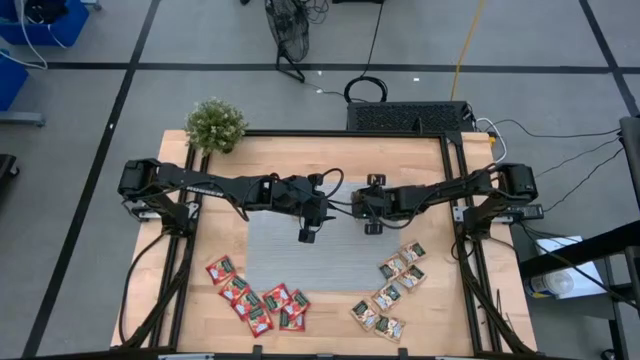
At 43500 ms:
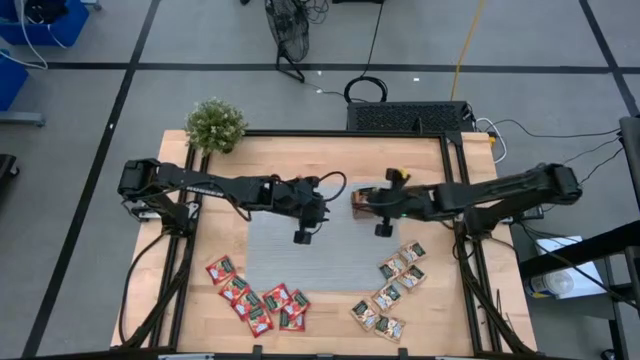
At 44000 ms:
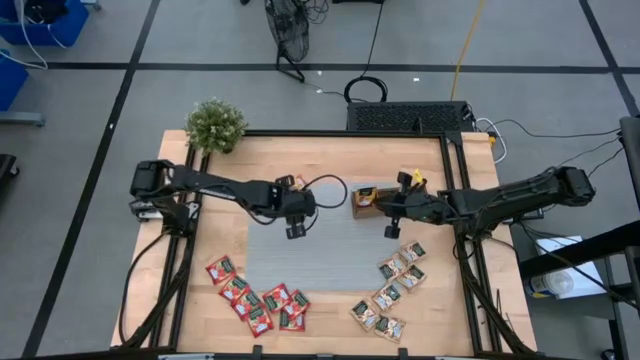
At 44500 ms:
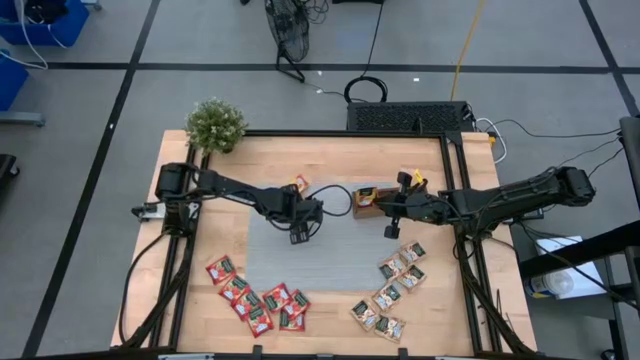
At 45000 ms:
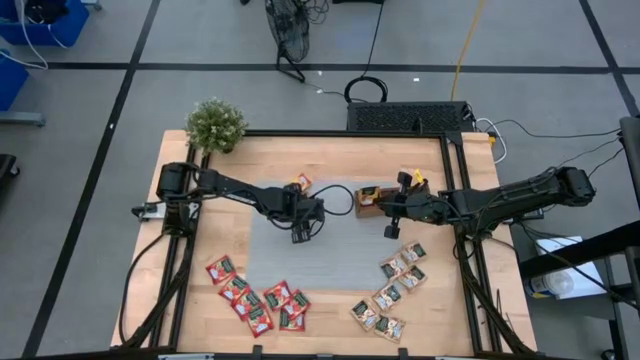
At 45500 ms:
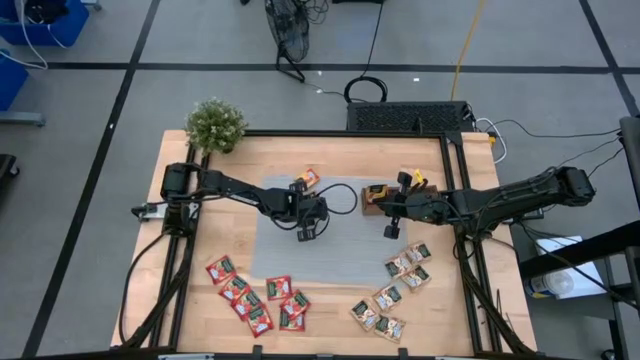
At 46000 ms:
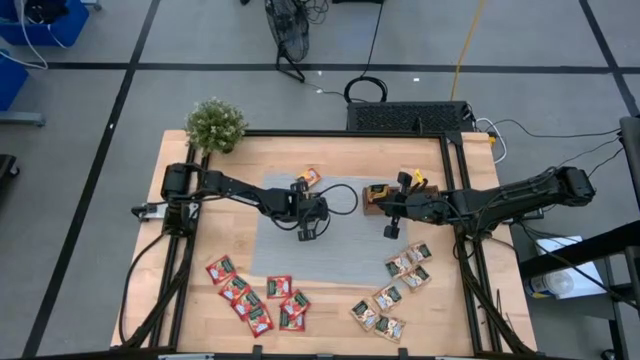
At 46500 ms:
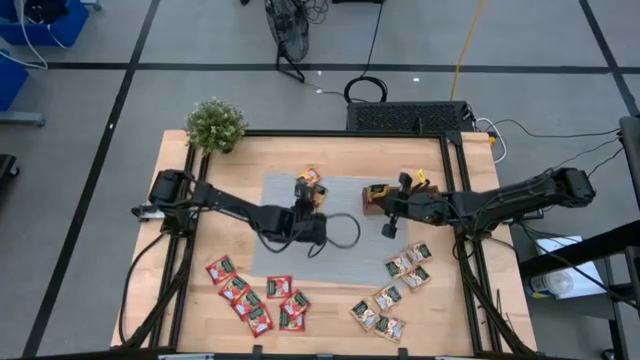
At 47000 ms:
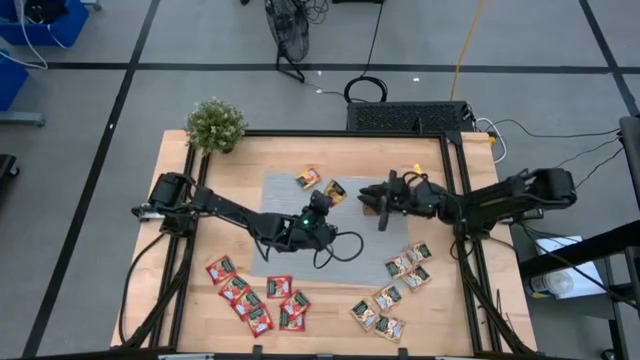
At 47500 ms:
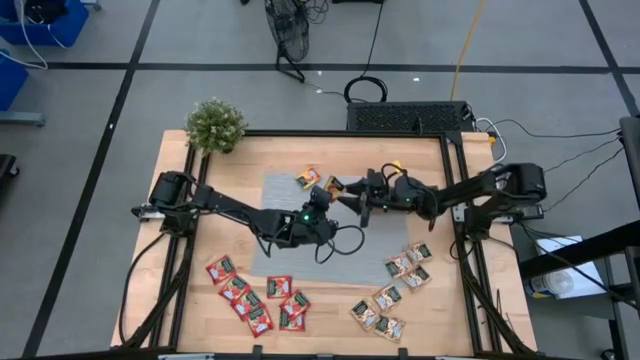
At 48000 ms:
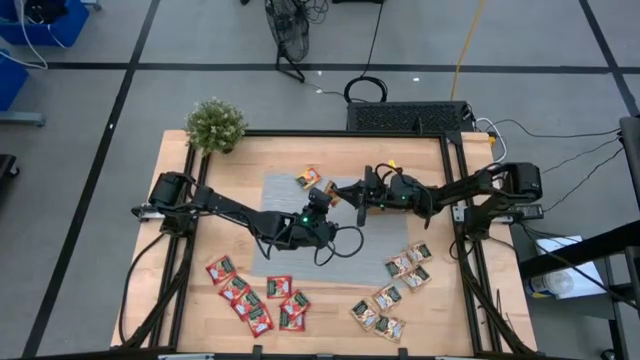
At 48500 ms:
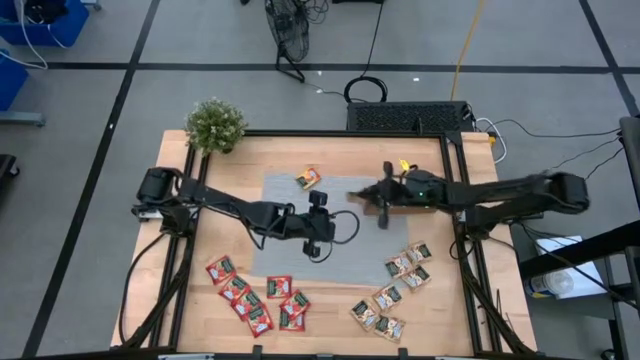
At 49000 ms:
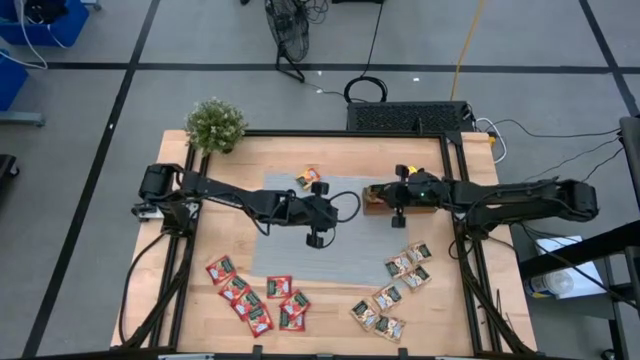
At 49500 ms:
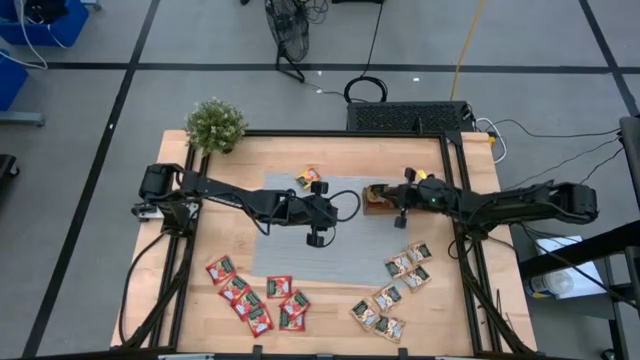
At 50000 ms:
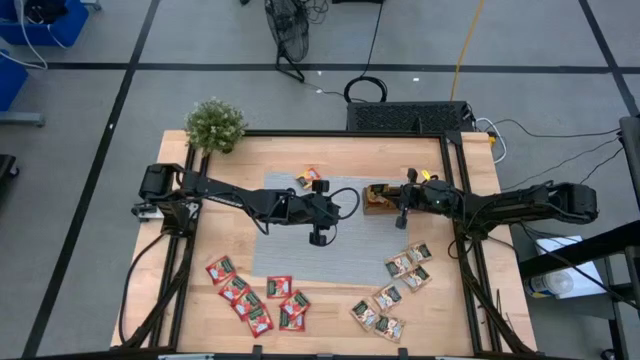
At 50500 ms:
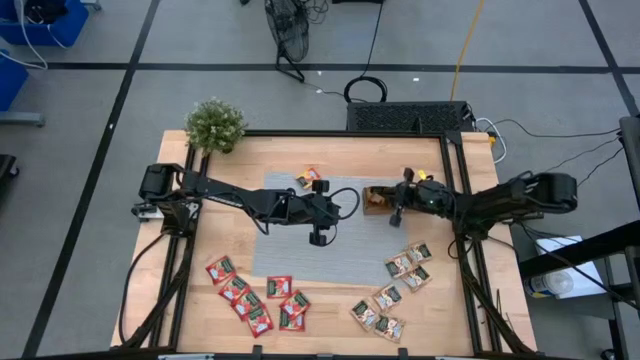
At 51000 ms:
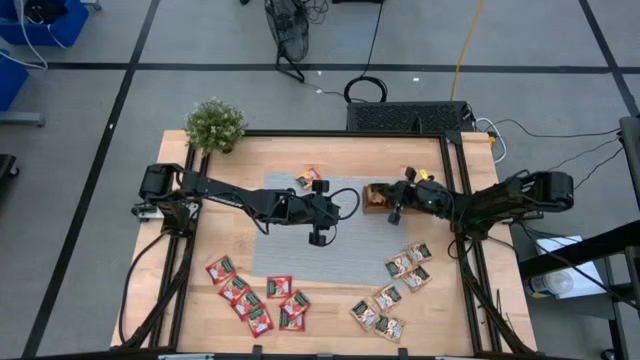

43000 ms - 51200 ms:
Task: Pick & Place Tea
Put the yellow tea bag into the left section of the wooden organizer

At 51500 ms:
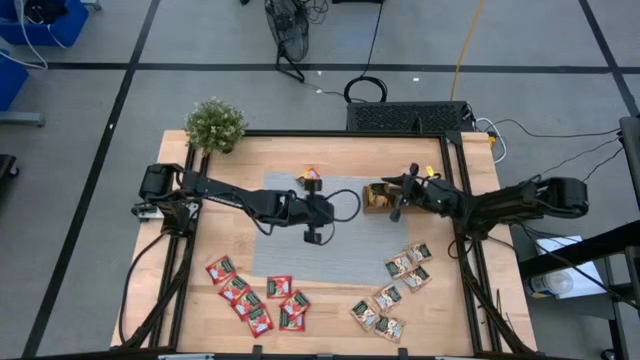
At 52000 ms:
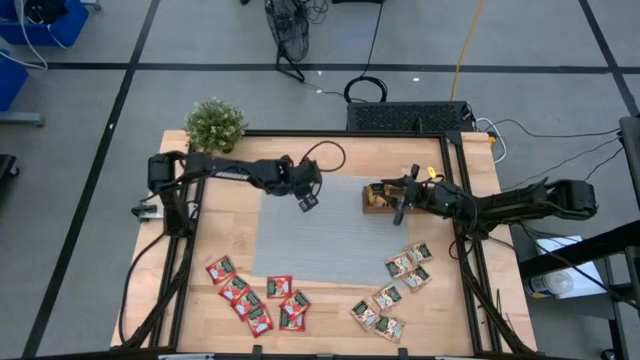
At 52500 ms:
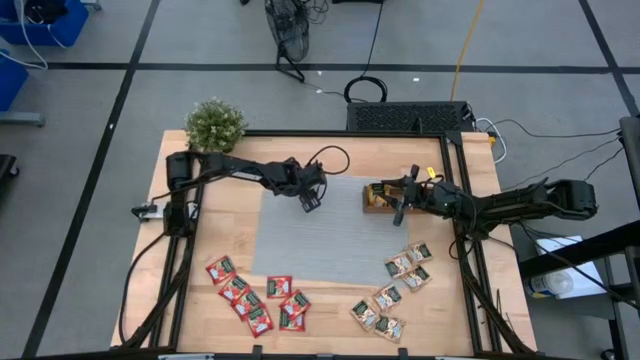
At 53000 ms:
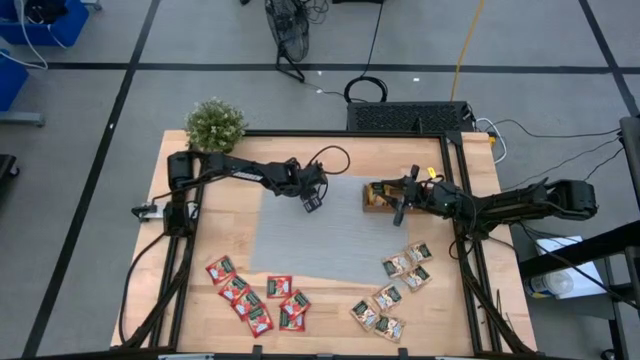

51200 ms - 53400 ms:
Put the yellow tea bag into the left section of the wooden organizer

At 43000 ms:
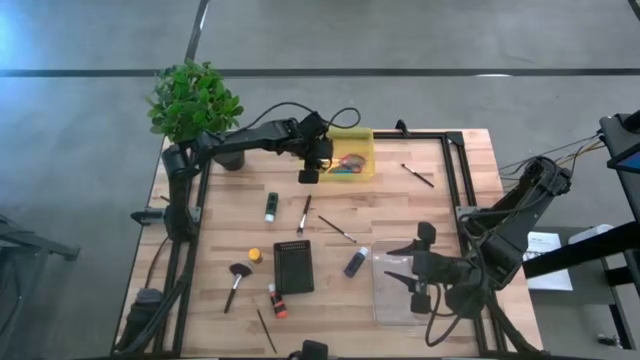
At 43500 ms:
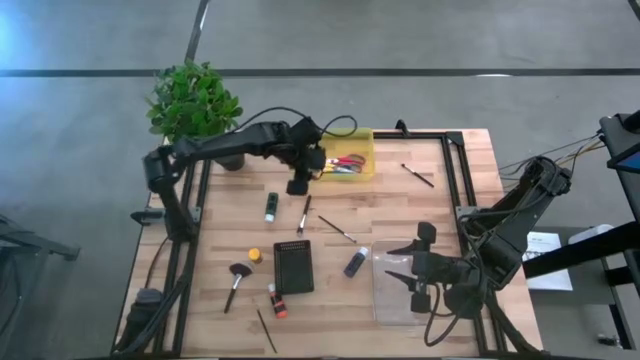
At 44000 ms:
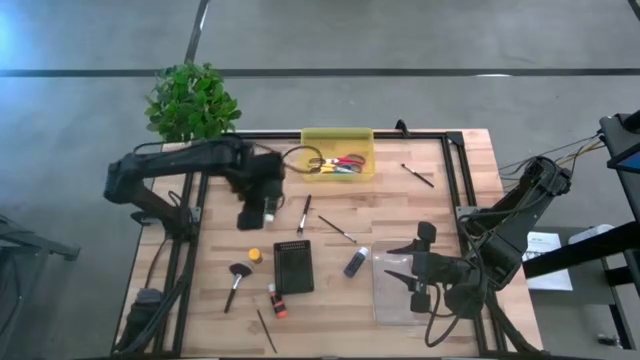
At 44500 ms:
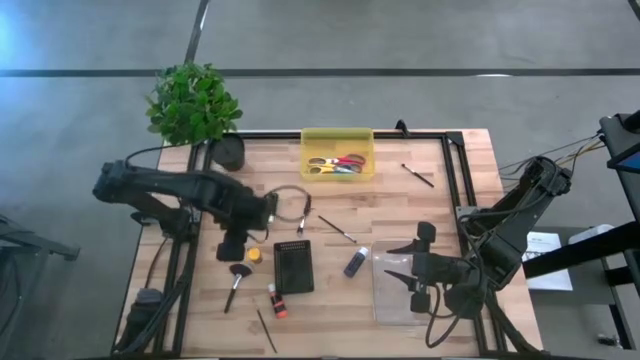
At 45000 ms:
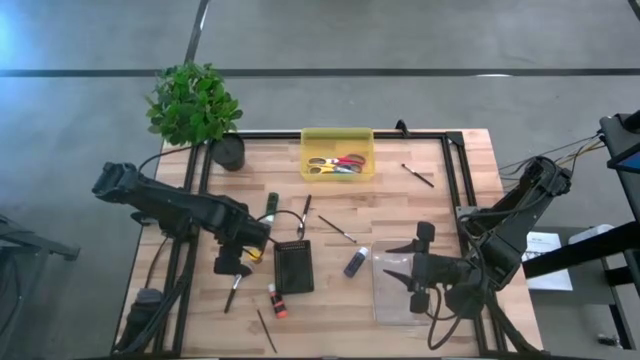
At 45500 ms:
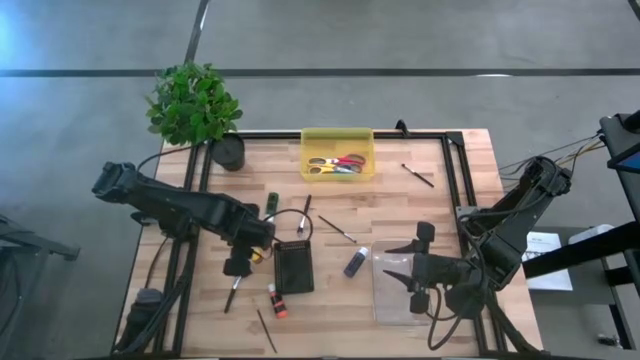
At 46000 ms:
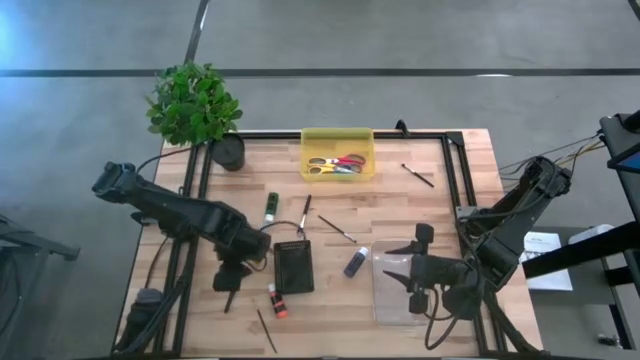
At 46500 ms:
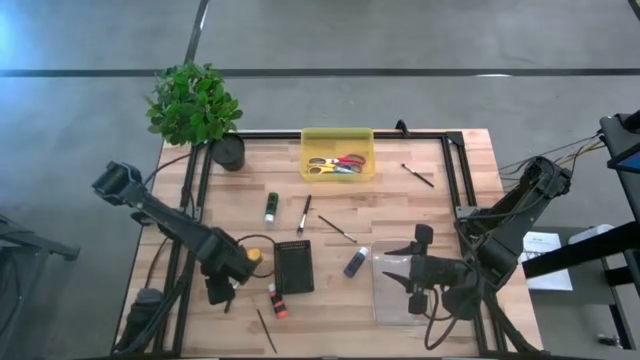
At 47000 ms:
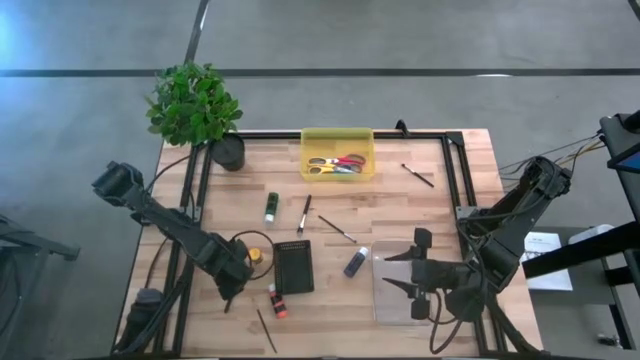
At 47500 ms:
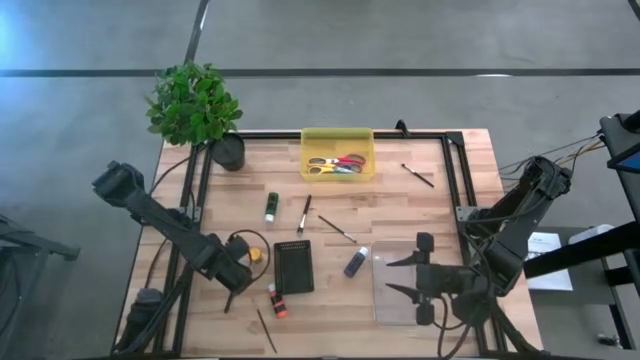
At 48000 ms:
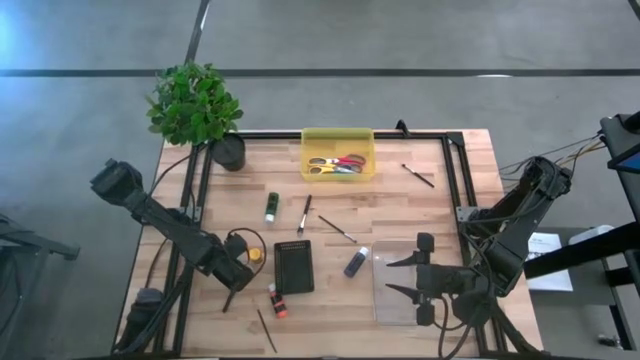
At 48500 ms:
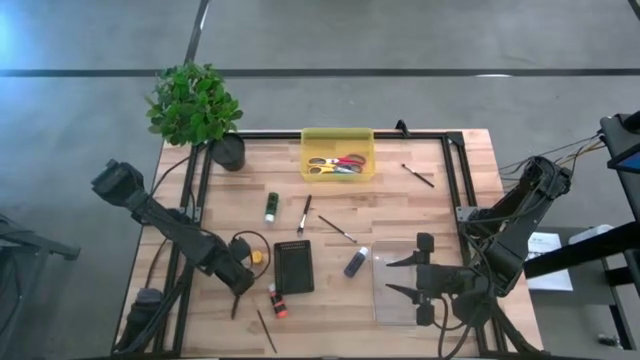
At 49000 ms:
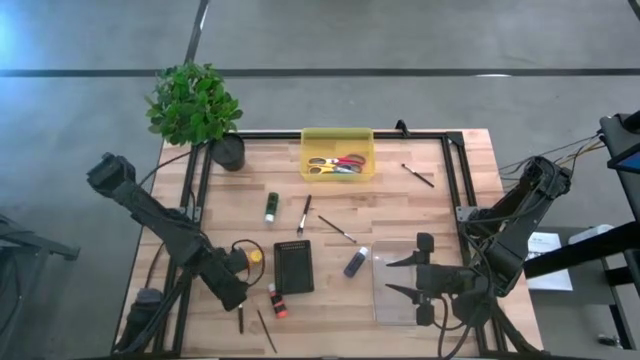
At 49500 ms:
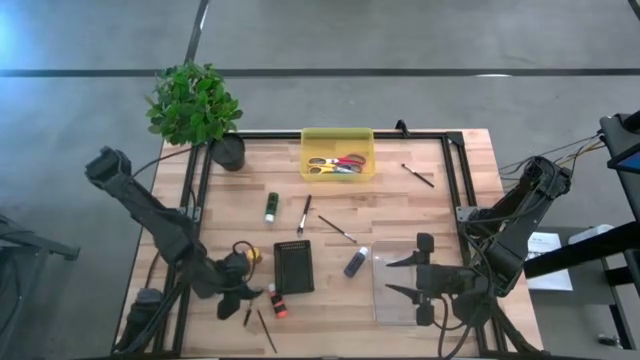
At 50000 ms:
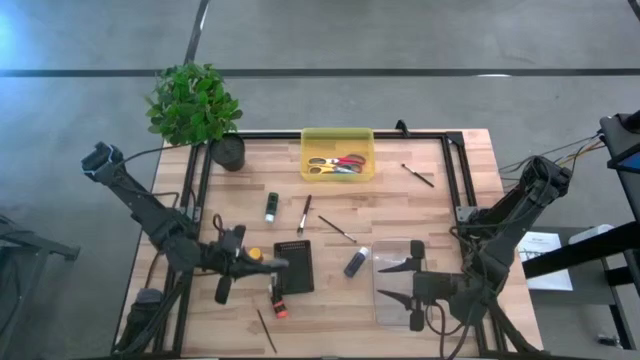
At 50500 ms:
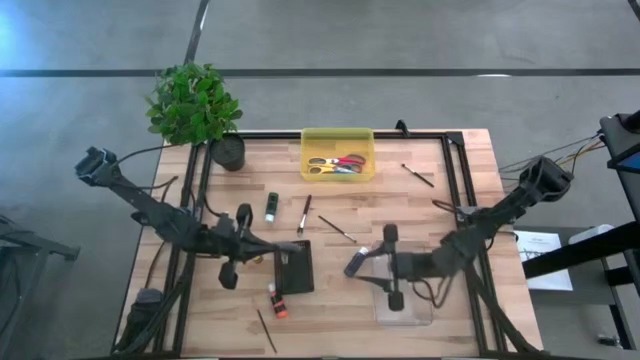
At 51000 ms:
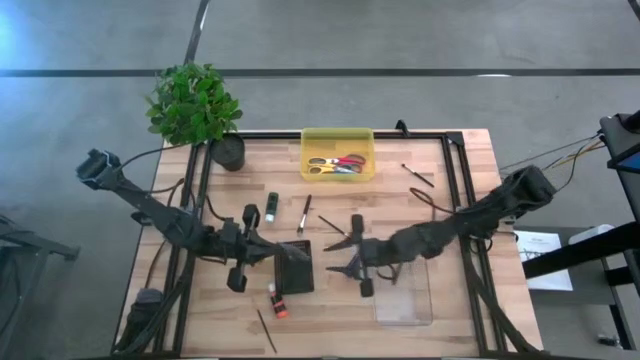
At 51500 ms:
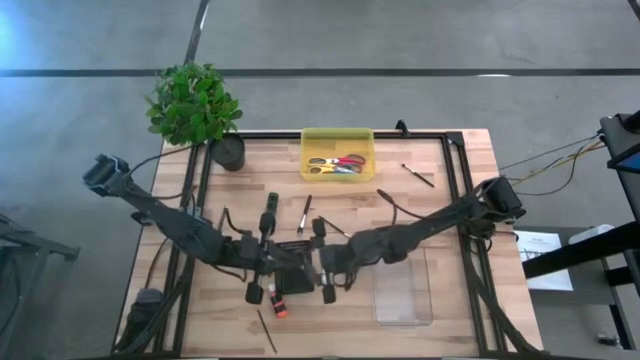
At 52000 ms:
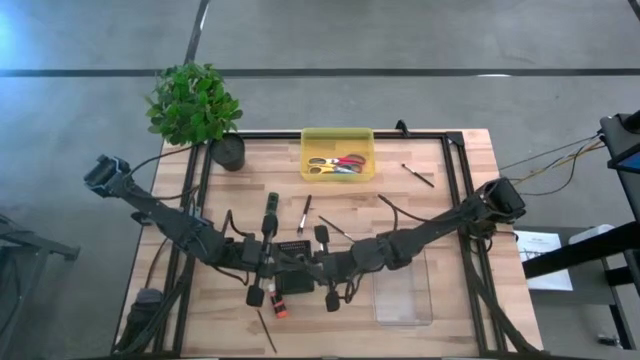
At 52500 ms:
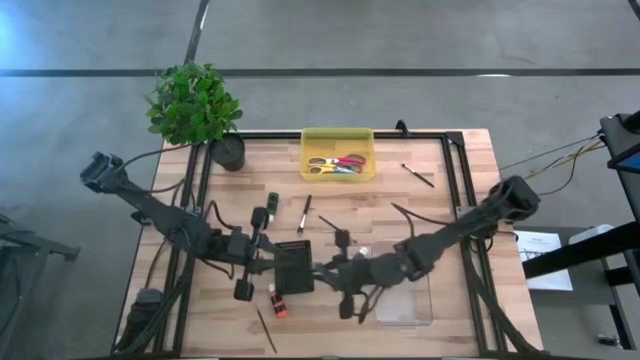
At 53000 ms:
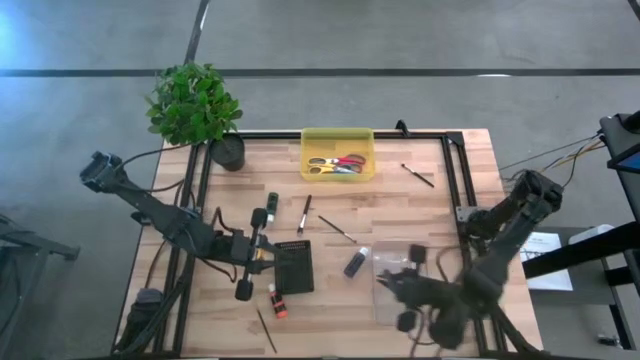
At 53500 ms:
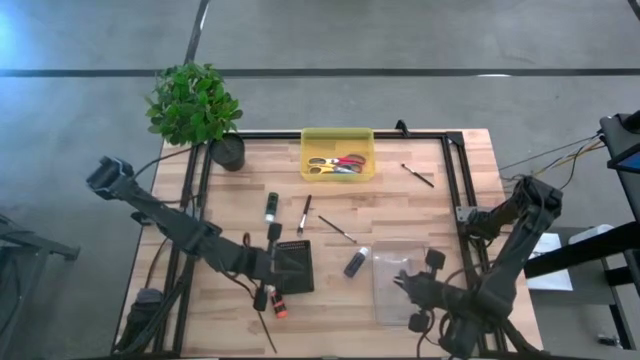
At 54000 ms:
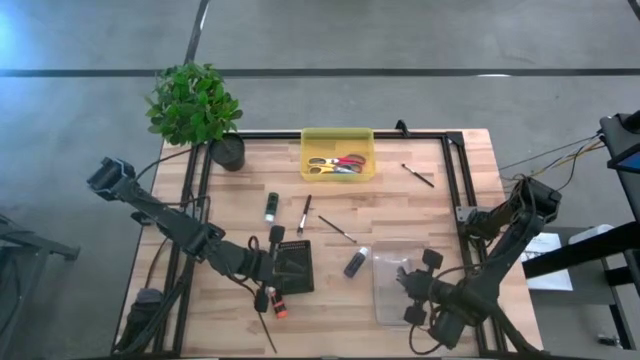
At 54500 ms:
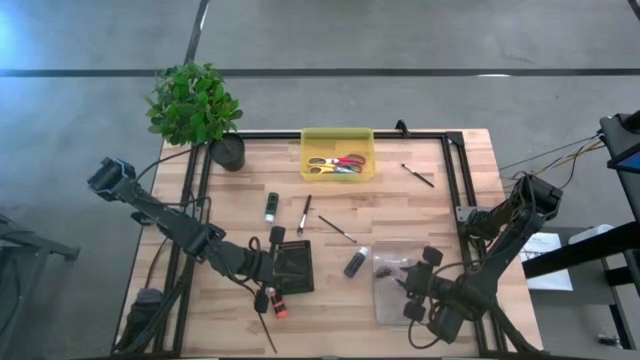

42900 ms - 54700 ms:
Task: Pick & Place Paint Supplies
Put the highlighter brush into the transparent bin
